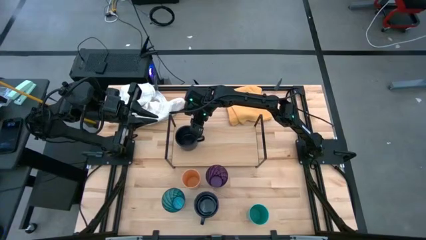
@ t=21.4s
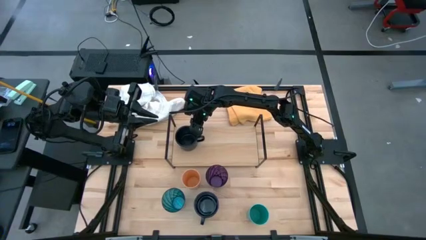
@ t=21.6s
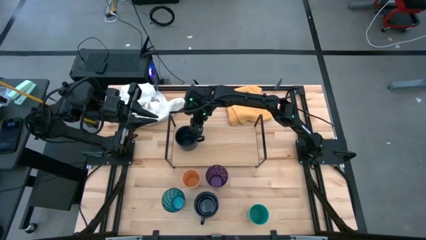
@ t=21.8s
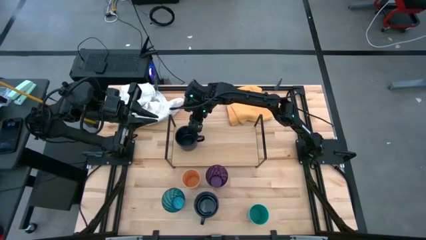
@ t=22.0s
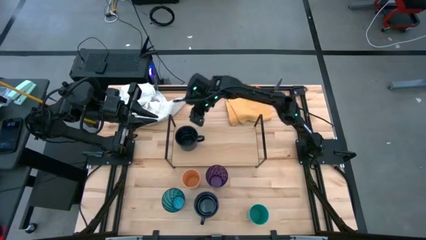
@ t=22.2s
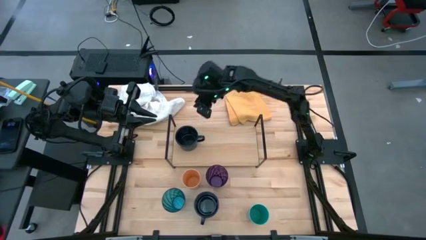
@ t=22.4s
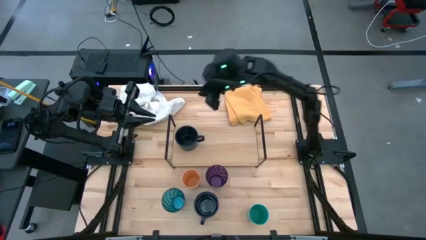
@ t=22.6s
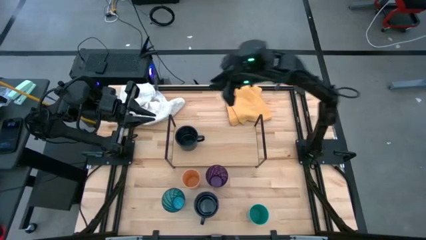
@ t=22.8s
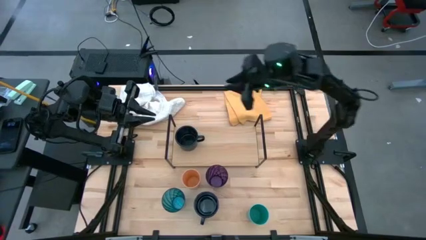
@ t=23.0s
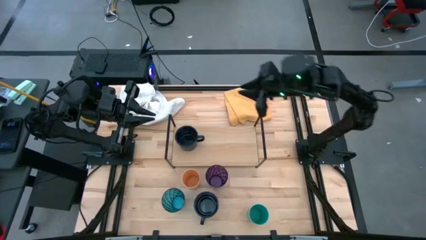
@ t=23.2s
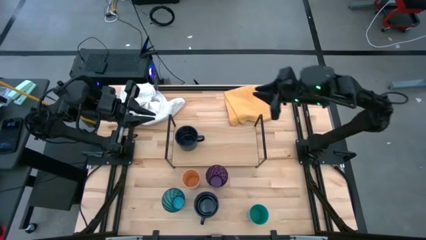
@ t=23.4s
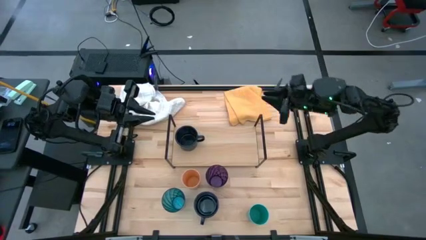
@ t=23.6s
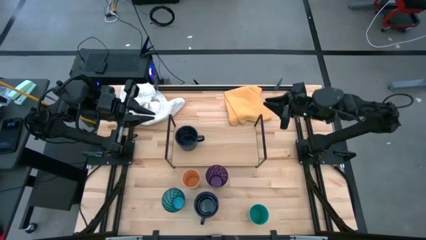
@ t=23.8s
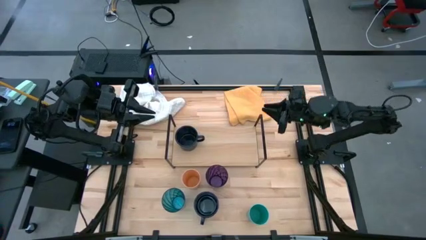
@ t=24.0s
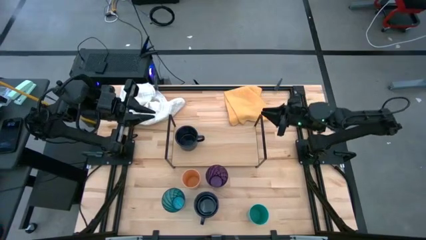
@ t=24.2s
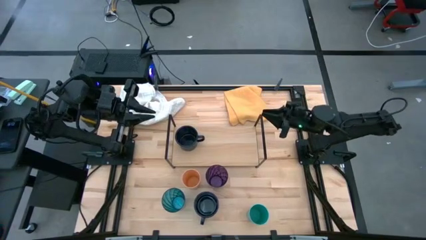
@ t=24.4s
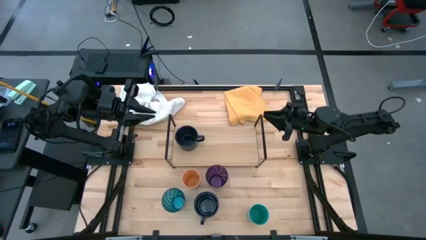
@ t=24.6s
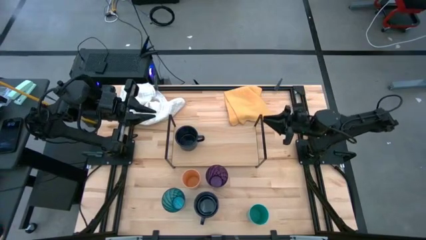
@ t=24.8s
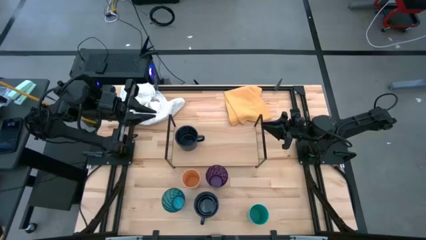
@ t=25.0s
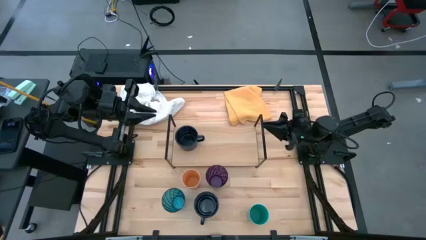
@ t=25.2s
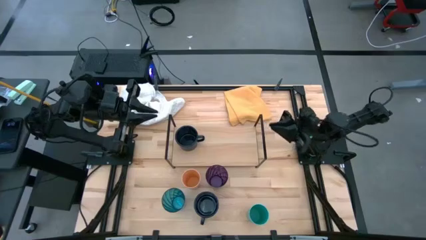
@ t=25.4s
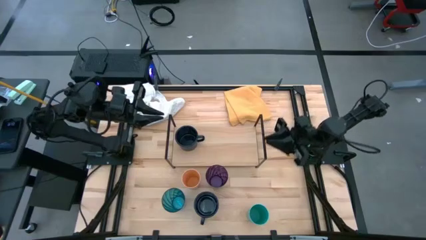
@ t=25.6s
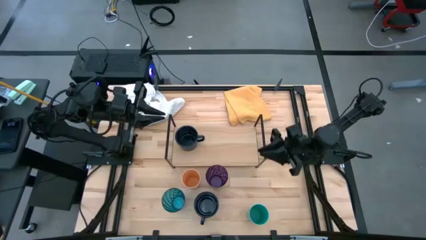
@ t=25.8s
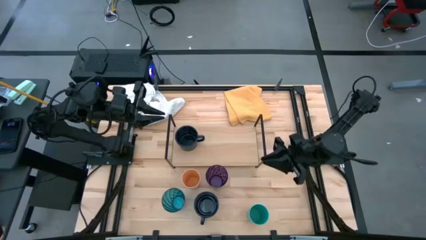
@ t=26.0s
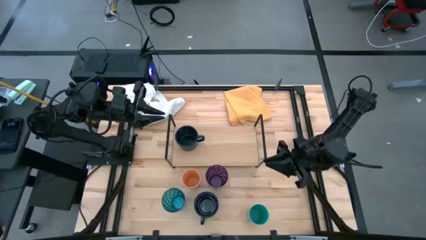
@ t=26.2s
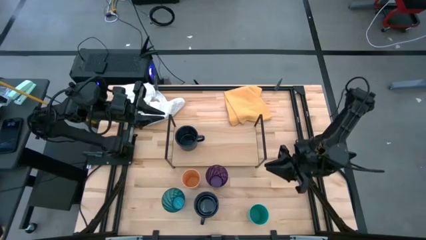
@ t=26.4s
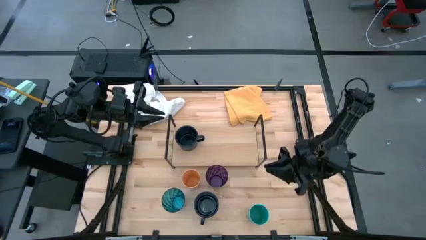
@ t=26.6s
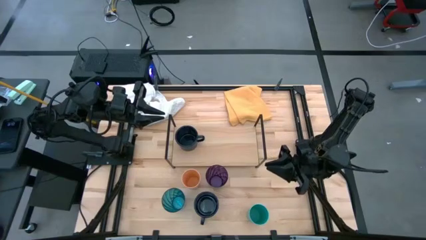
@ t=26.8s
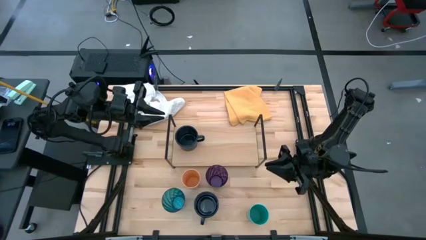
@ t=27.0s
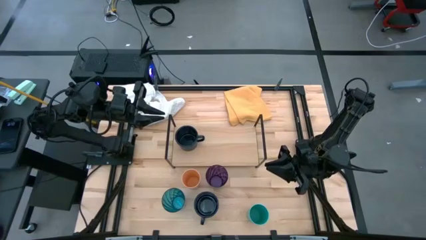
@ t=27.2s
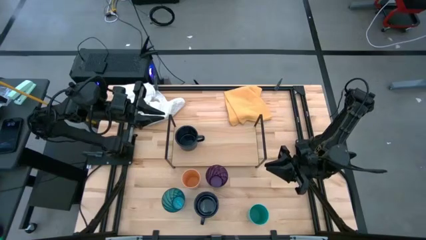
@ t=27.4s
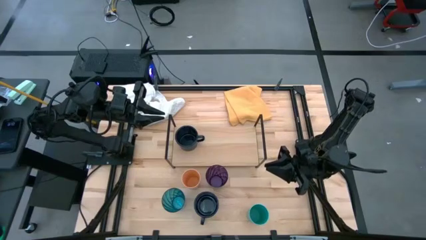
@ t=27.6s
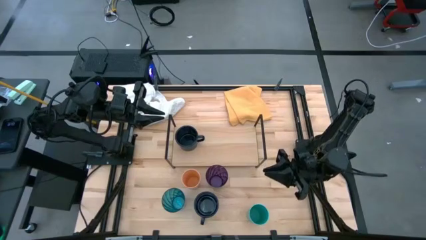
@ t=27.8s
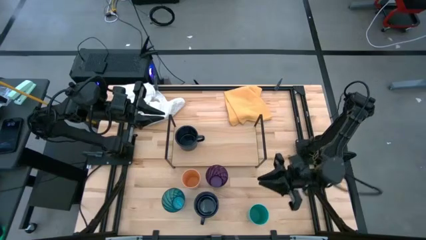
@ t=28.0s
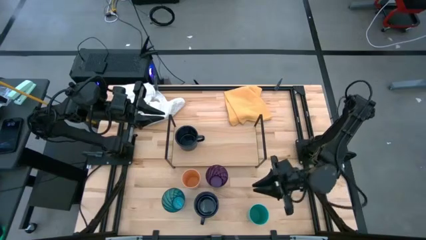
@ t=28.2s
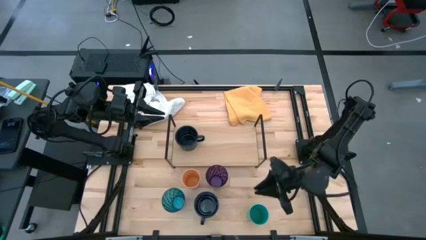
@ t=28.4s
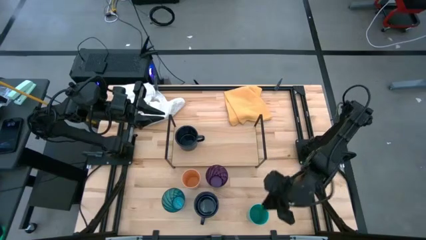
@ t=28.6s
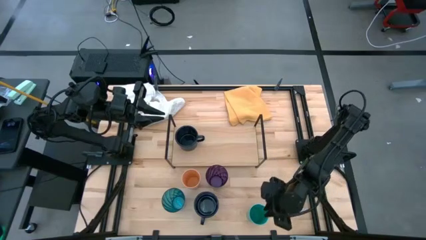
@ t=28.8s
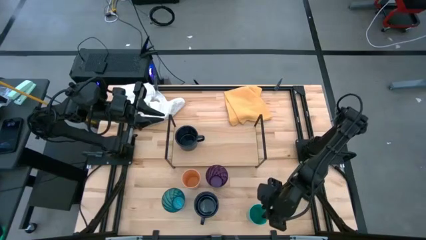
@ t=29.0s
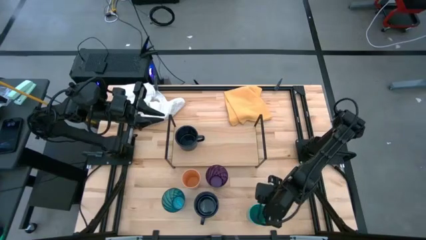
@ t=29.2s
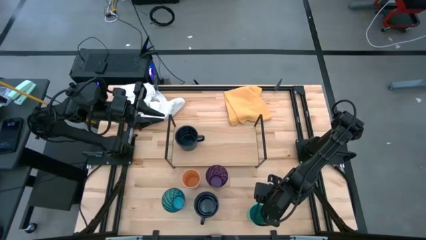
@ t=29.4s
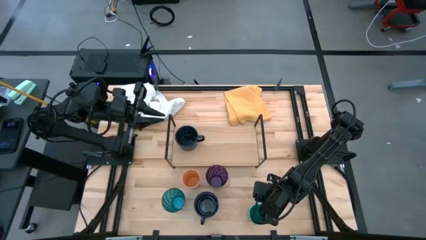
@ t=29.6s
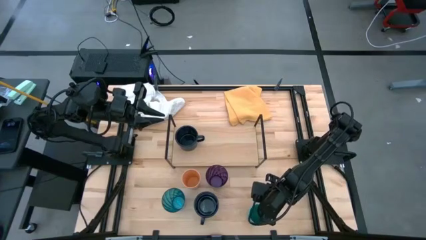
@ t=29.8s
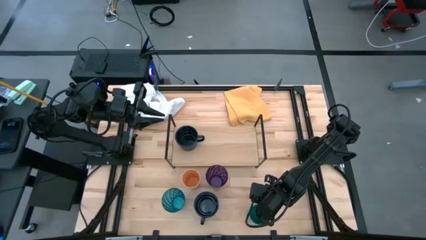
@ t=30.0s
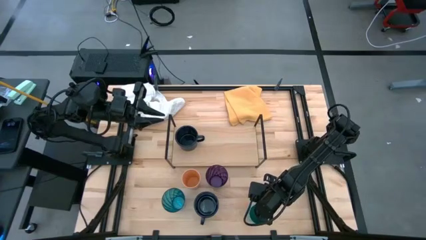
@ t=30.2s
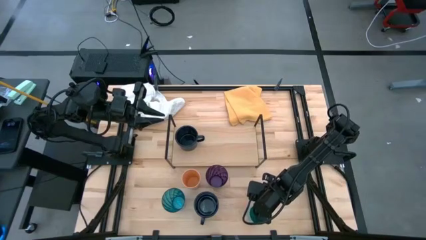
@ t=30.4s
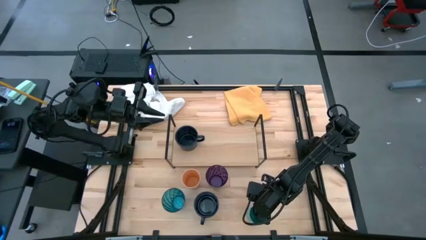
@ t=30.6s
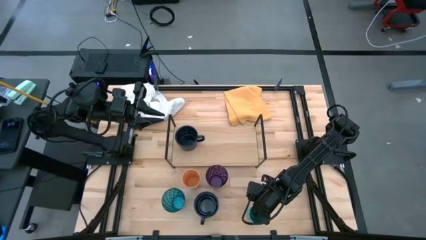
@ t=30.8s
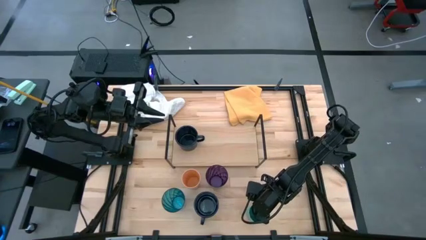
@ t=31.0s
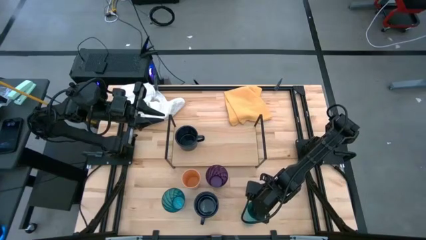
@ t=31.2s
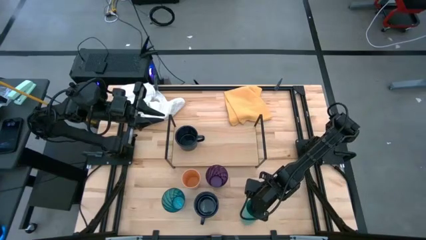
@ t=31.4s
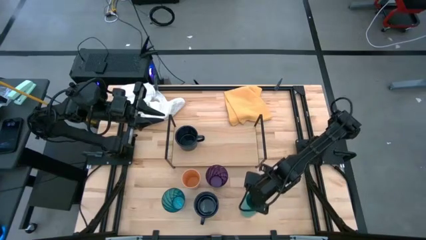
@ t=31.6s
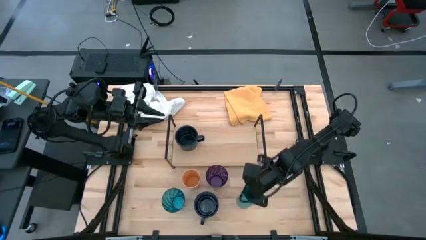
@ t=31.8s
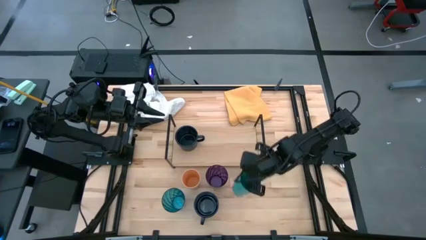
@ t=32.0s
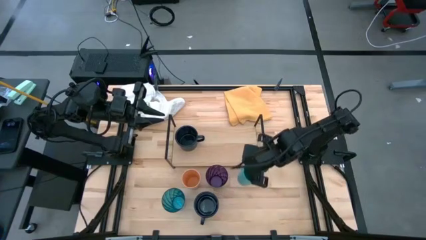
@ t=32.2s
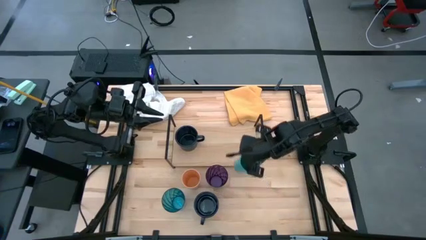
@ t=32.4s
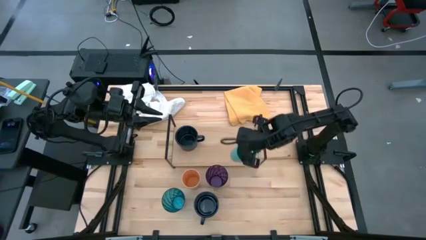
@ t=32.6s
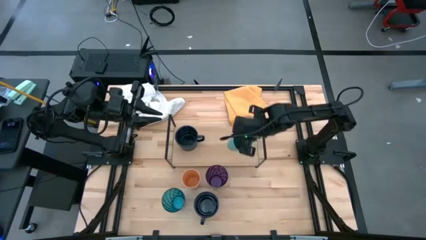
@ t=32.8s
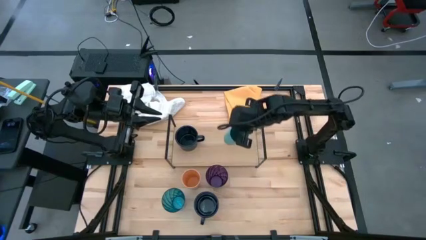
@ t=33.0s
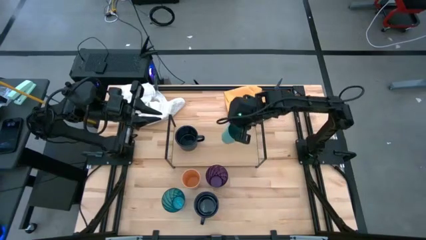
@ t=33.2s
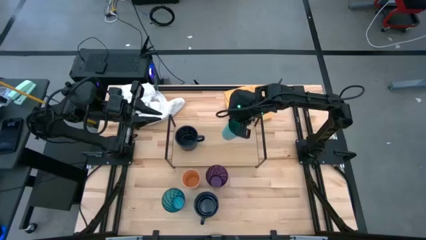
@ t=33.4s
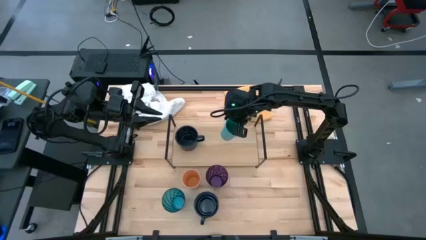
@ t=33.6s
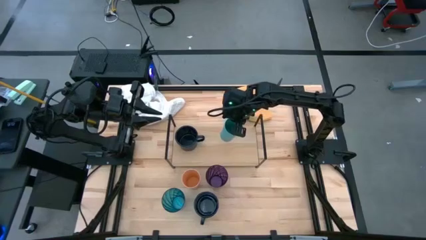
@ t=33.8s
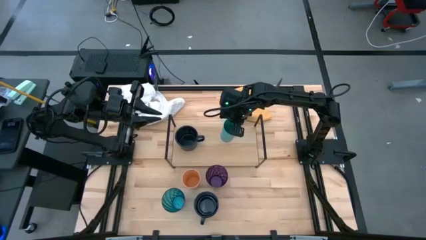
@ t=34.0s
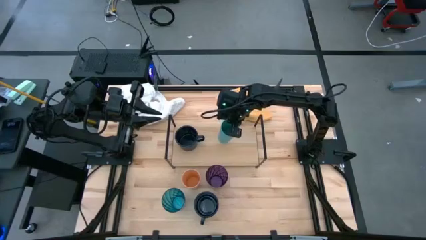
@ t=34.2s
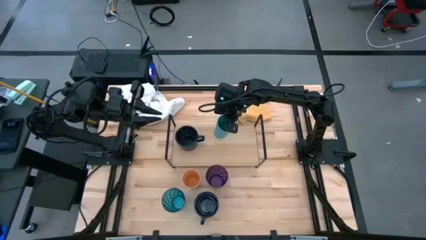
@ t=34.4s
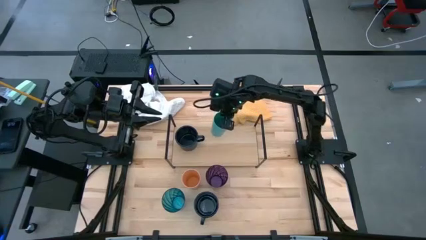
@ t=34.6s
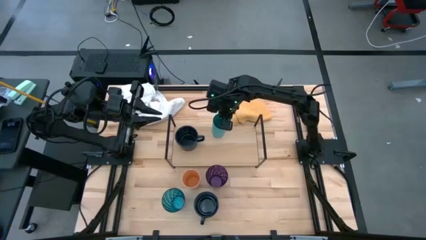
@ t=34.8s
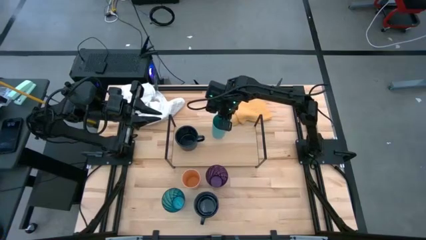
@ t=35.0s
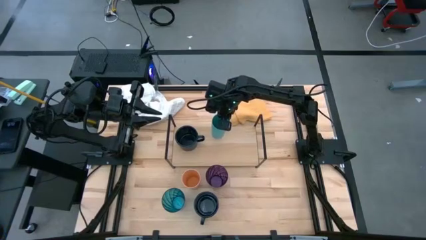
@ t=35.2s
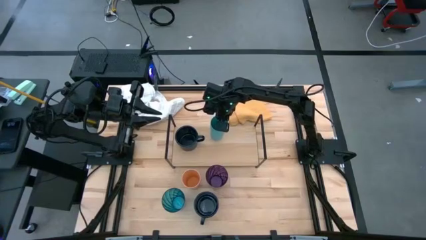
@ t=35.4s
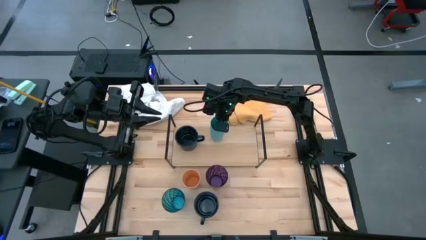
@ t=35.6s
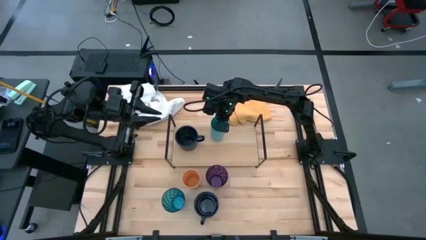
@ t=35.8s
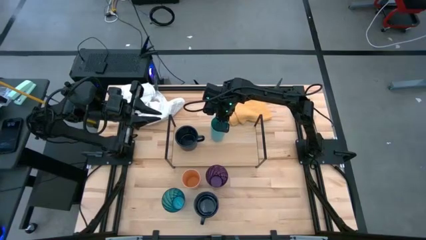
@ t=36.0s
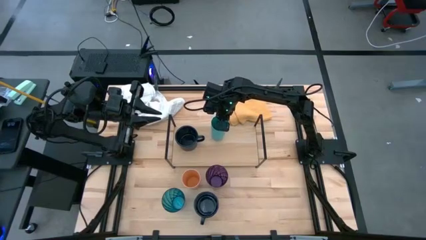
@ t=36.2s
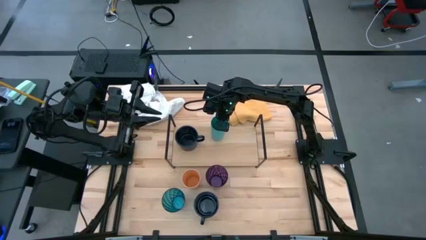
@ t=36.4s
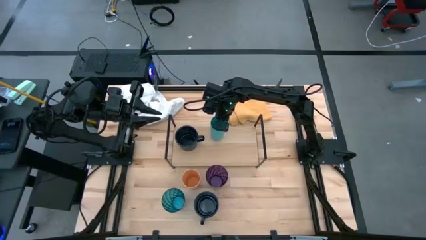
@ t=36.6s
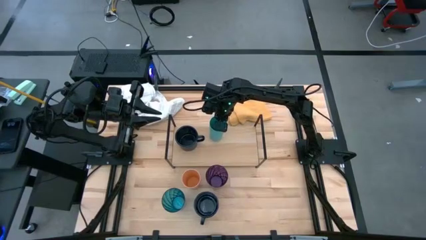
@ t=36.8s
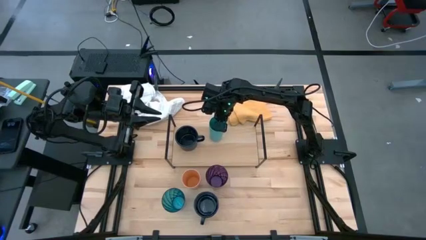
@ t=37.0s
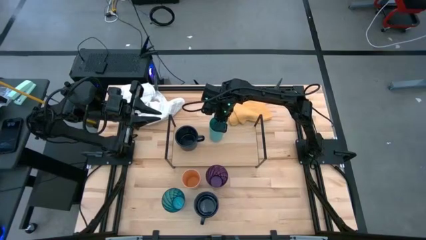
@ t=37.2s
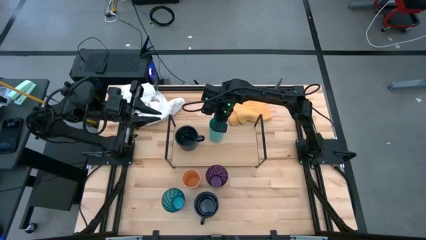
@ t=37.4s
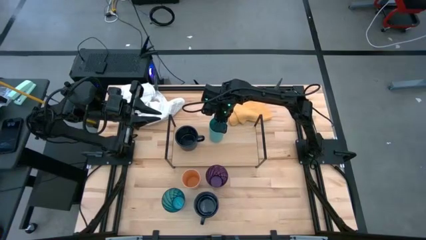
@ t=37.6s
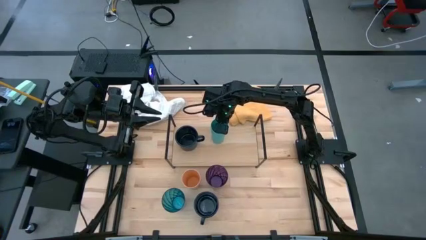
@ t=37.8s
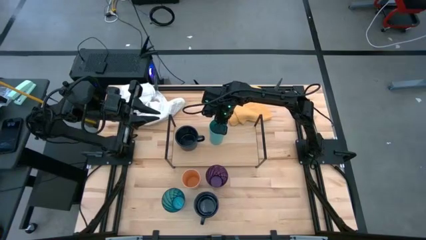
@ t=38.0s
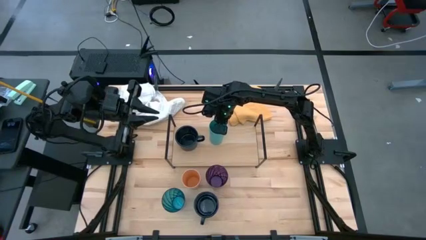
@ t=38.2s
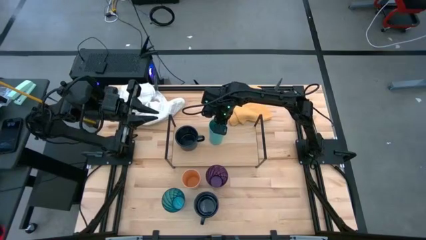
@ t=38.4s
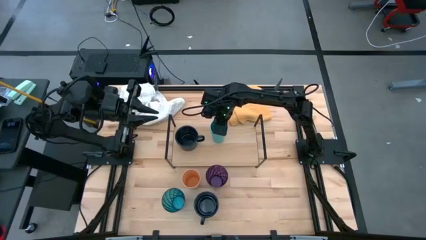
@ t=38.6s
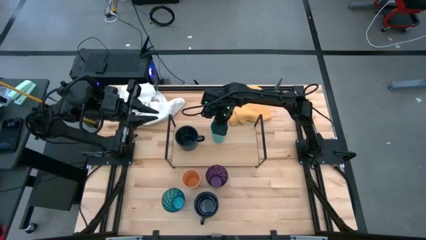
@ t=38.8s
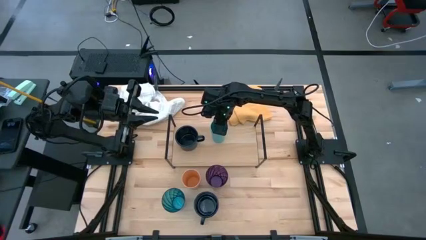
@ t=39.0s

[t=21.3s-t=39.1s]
Task: Stack small to large cups/mugs on shelf
Put the light blue cup on the shelf
